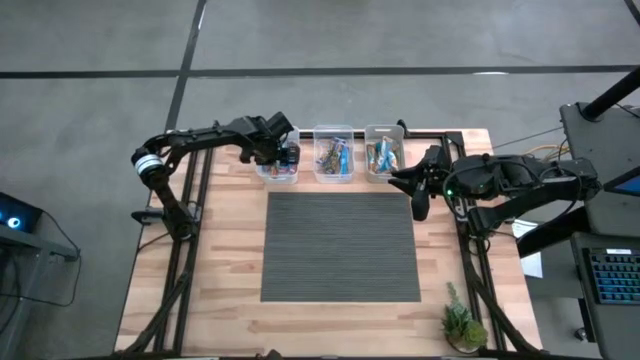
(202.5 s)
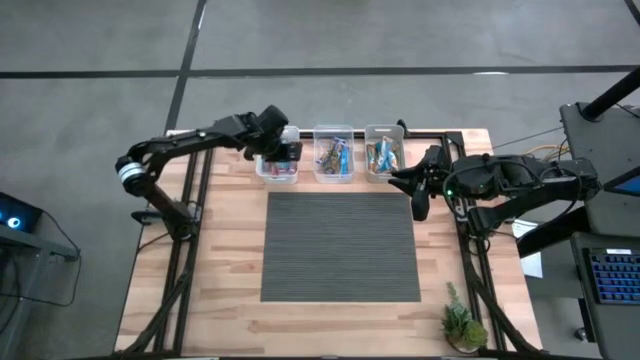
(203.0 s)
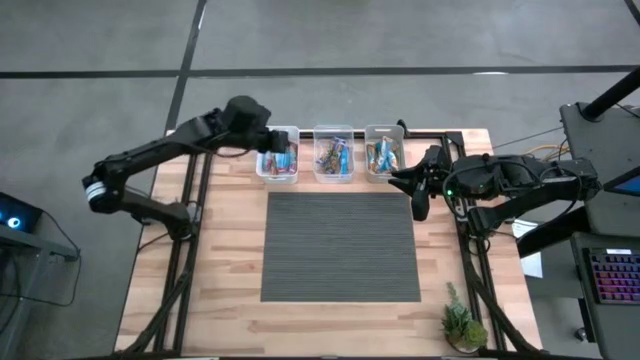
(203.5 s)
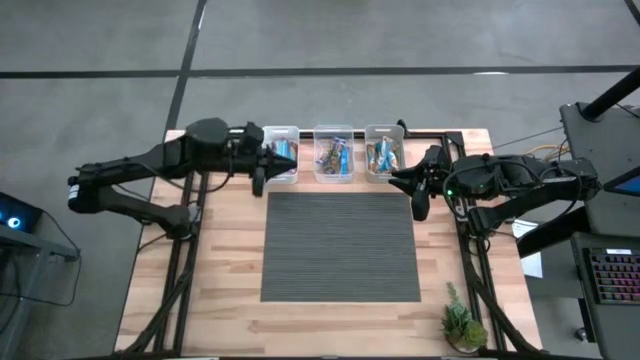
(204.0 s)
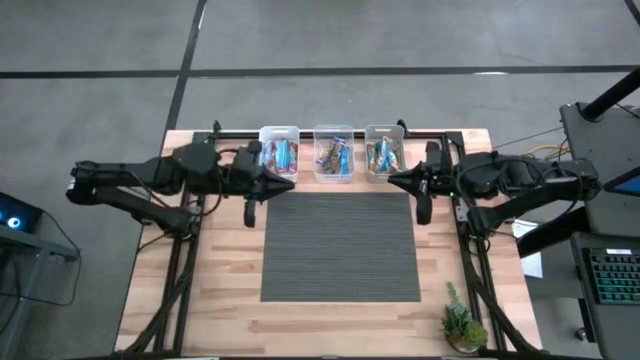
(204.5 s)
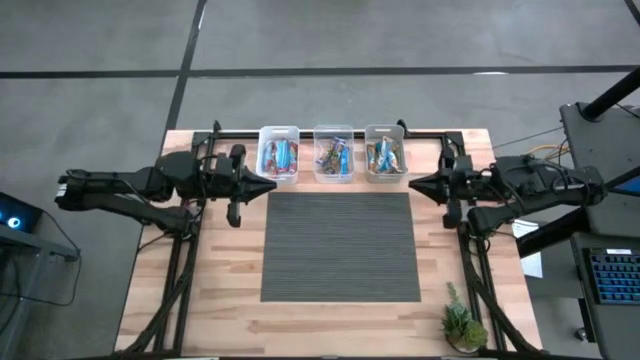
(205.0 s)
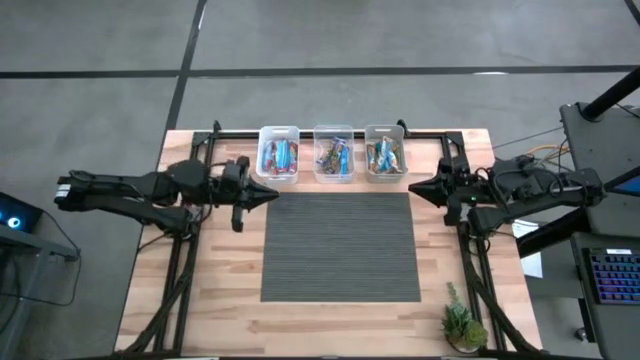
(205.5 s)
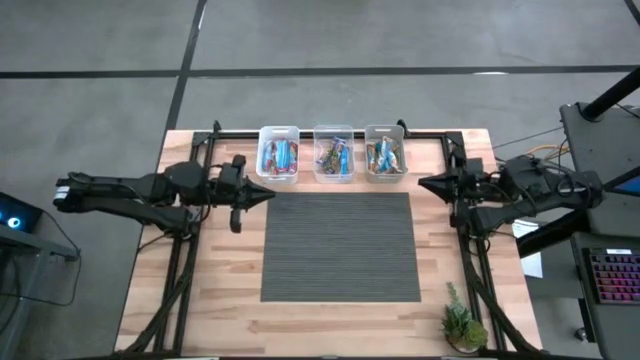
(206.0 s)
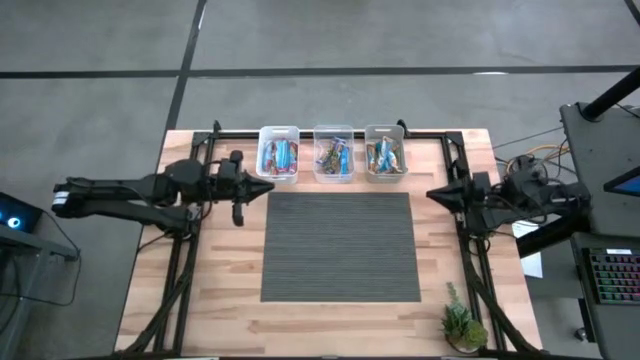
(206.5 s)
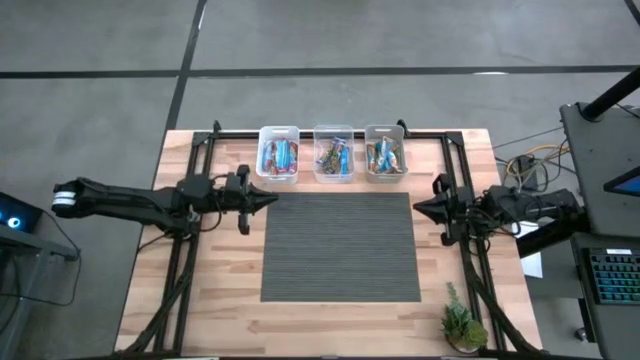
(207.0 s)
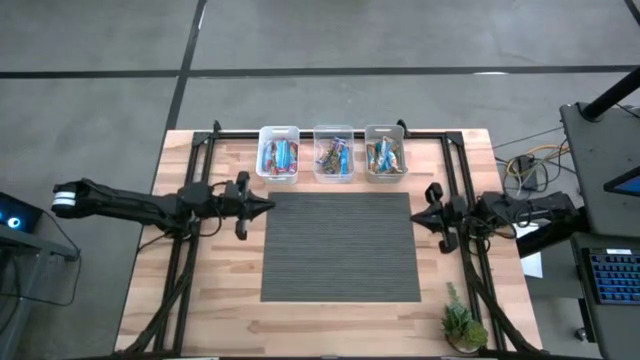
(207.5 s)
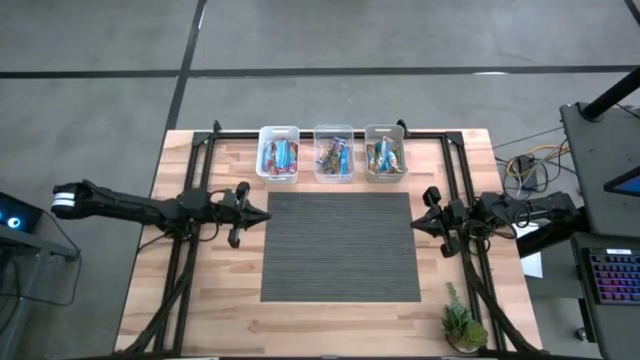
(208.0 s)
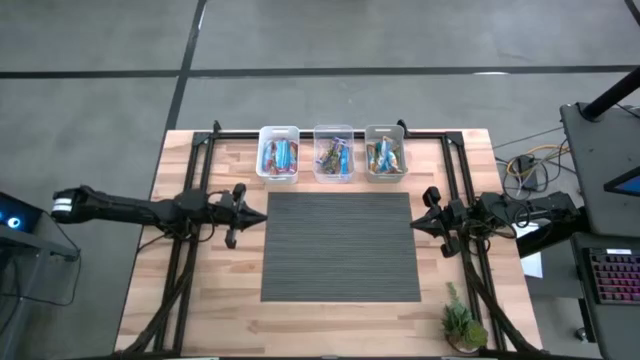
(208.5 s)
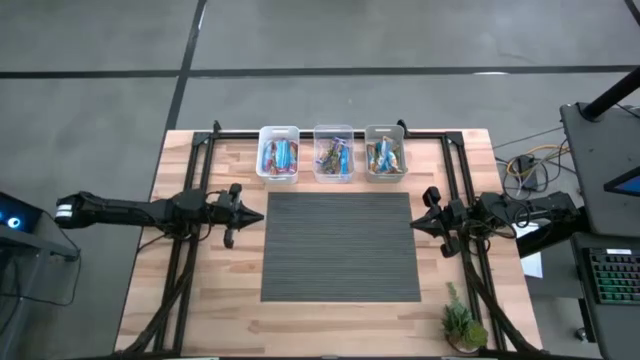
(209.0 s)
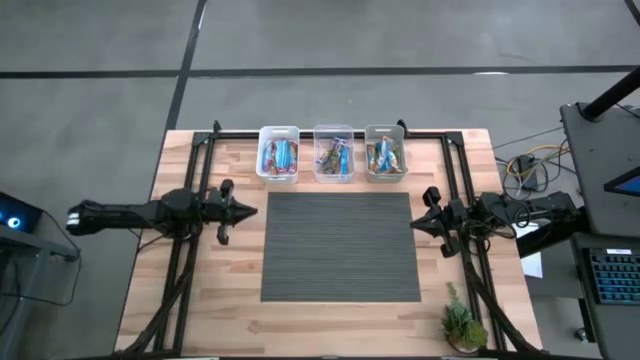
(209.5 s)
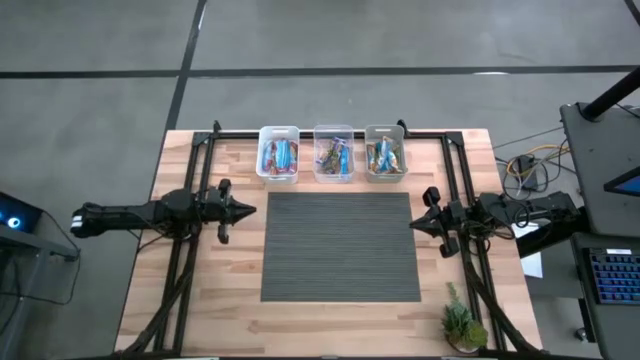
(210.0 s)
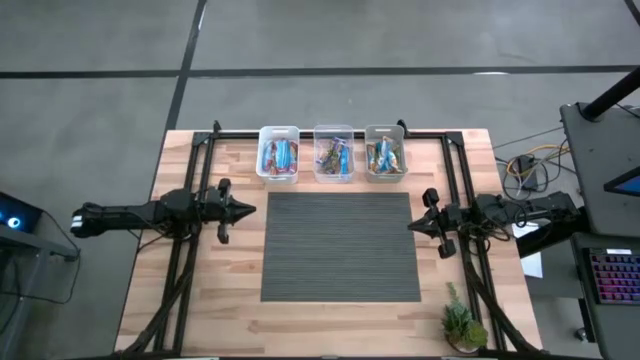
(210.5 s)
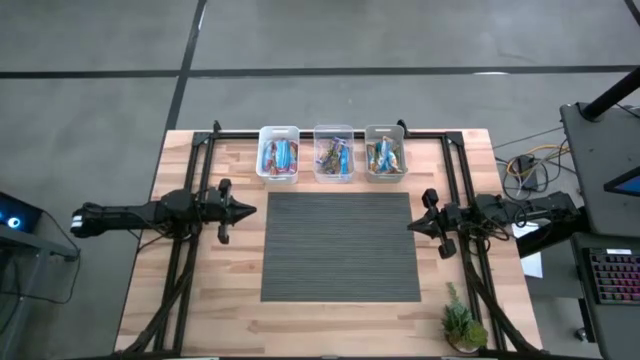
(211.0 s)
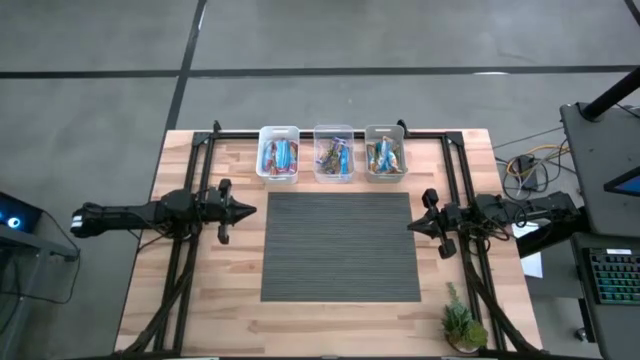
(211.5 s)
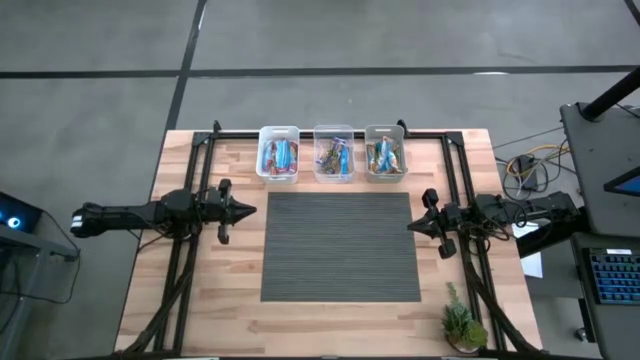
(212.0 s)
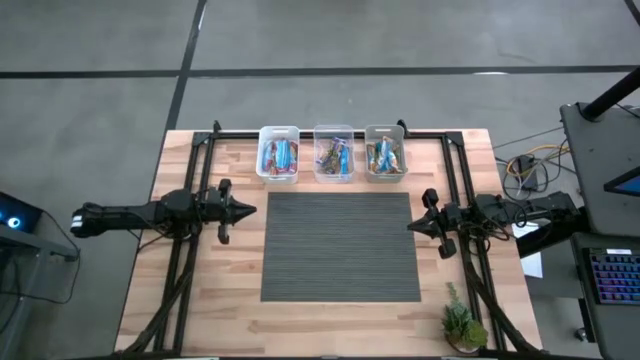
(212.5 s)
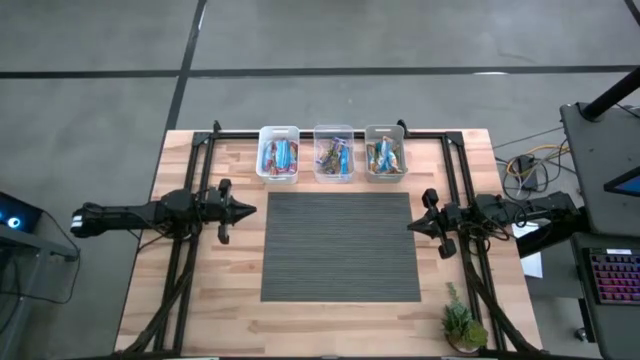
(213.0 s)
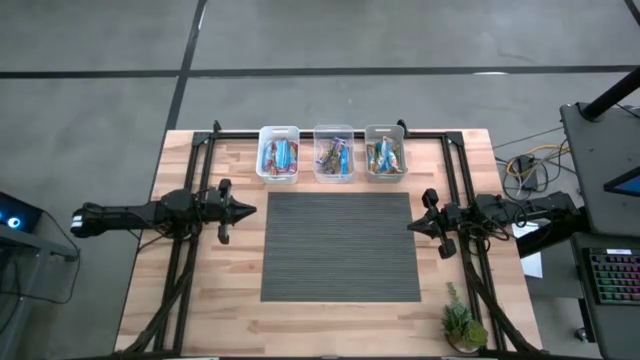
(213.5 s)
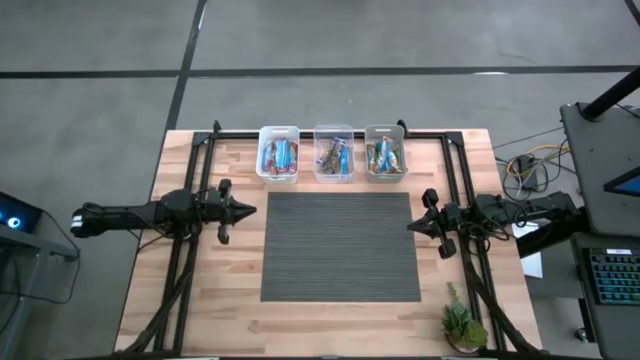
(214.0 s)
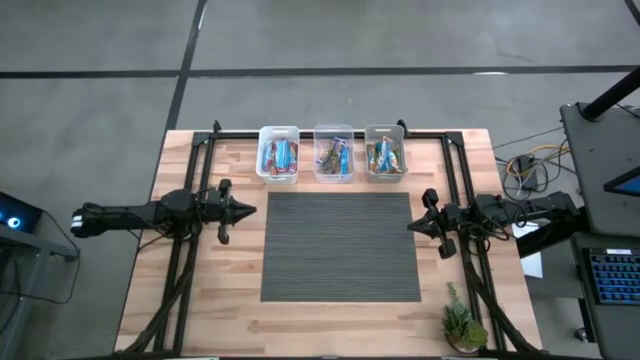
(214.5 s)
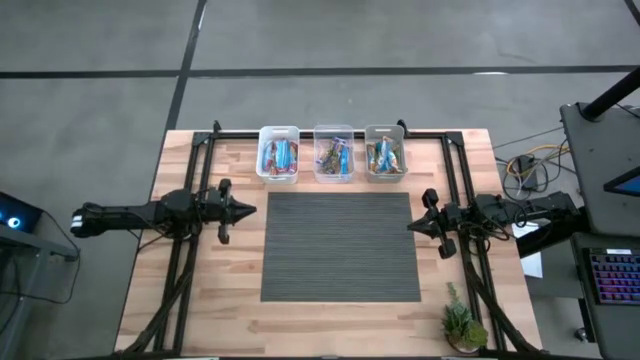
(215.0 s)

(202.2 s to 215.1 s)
Task: Pick and place Granola Bars by type
Return to Home Position

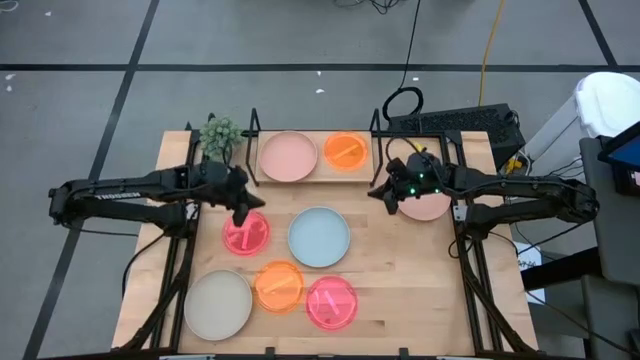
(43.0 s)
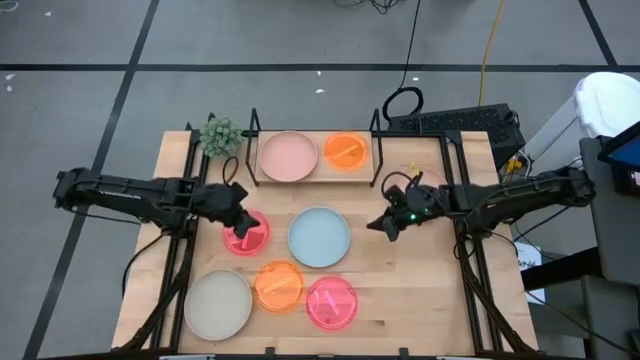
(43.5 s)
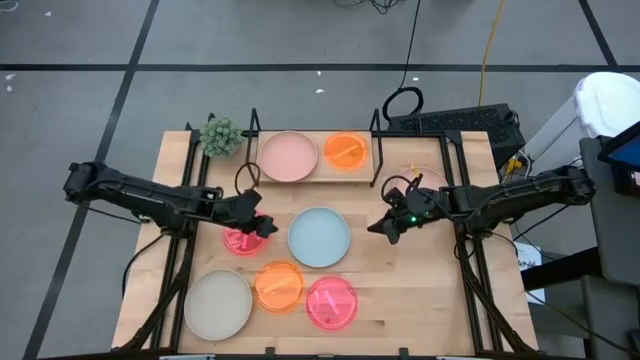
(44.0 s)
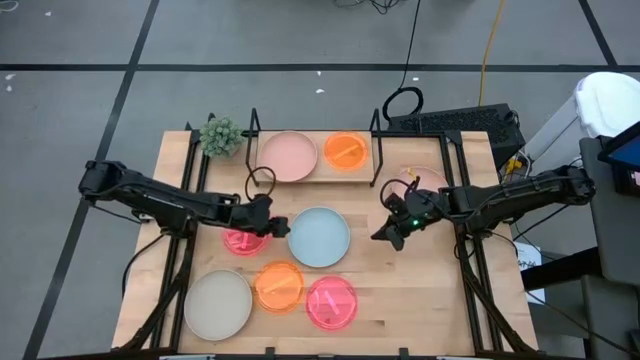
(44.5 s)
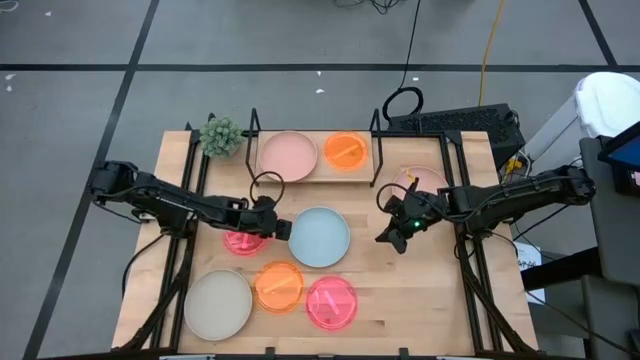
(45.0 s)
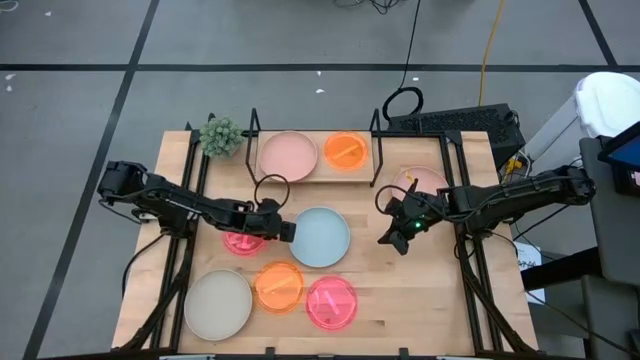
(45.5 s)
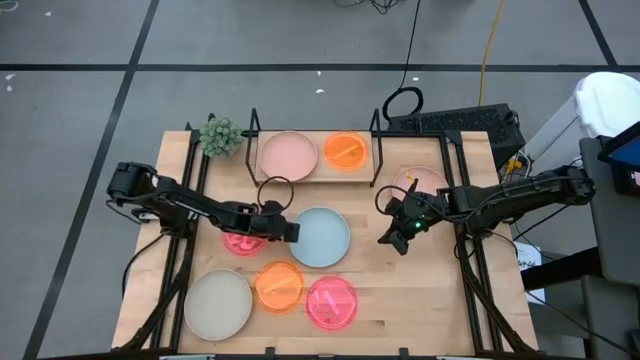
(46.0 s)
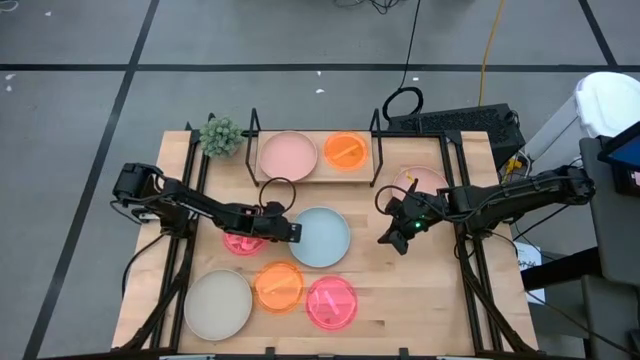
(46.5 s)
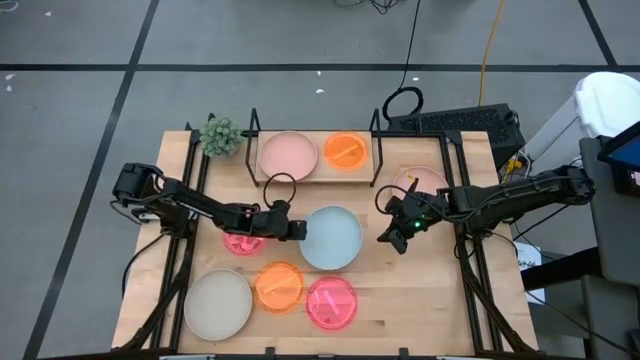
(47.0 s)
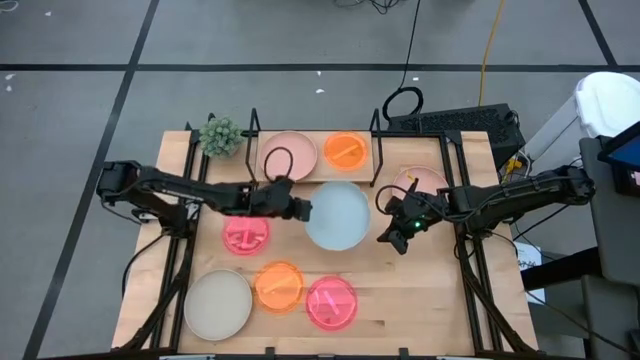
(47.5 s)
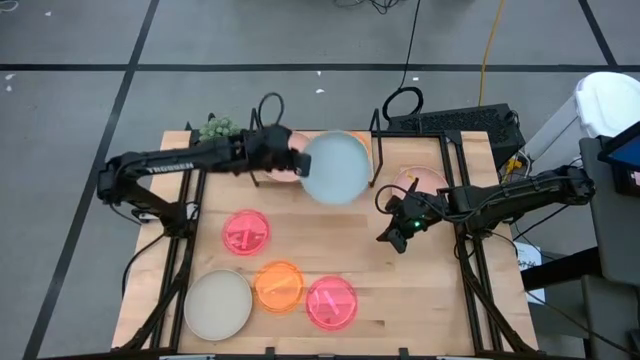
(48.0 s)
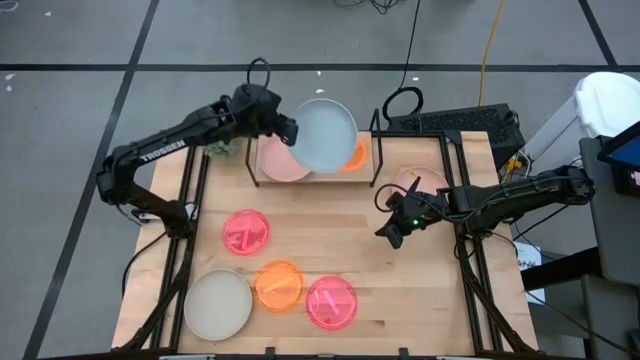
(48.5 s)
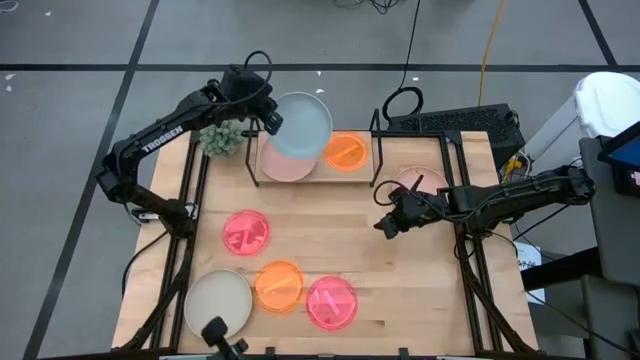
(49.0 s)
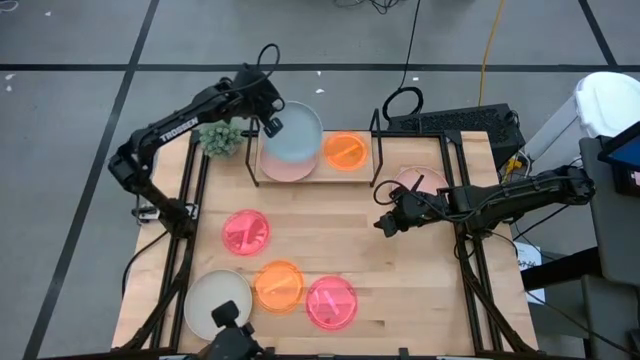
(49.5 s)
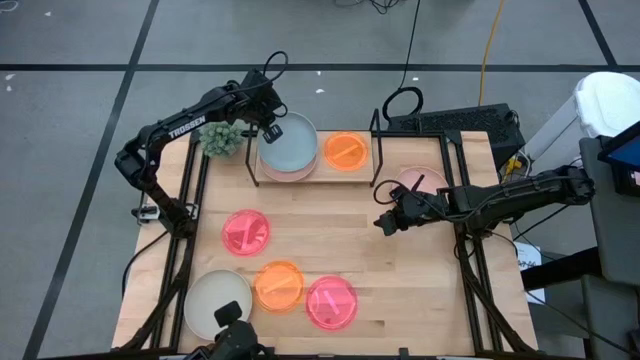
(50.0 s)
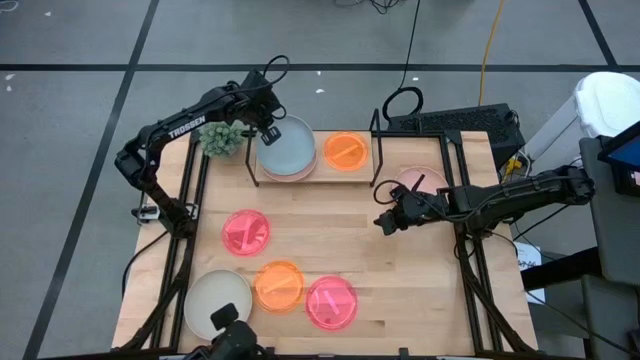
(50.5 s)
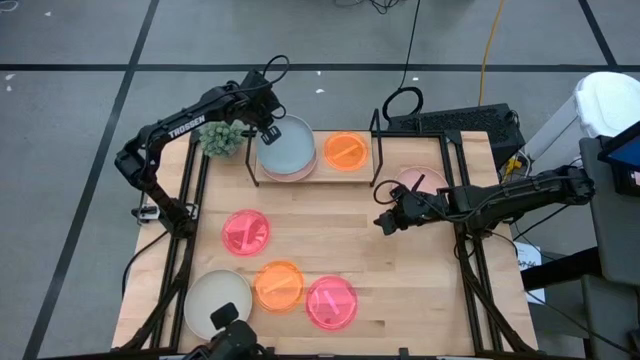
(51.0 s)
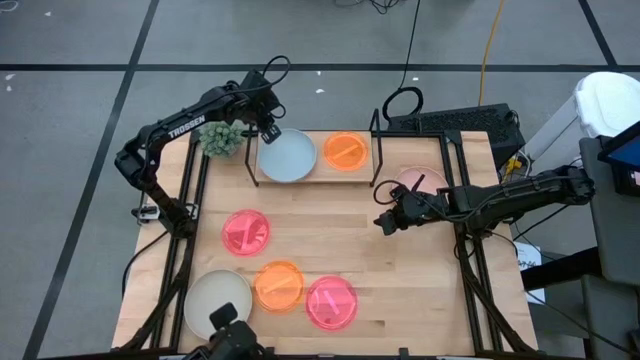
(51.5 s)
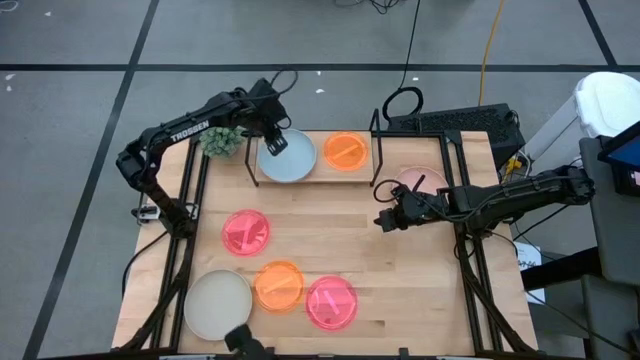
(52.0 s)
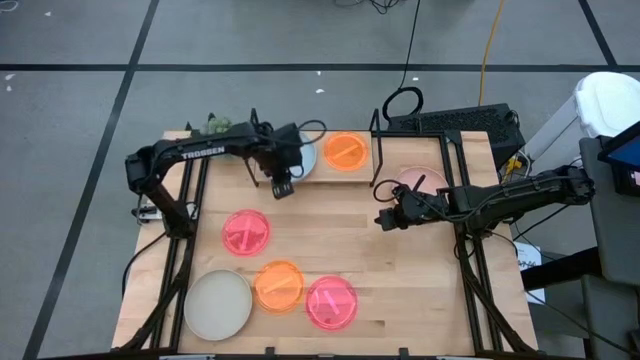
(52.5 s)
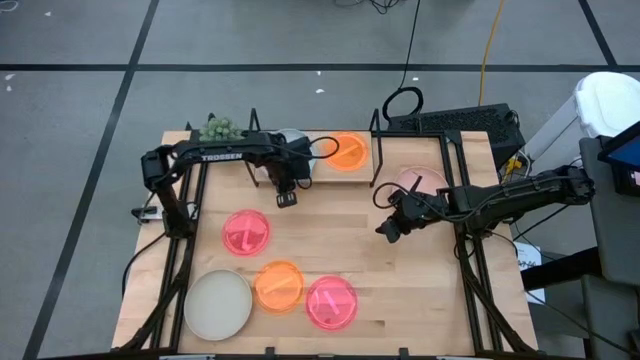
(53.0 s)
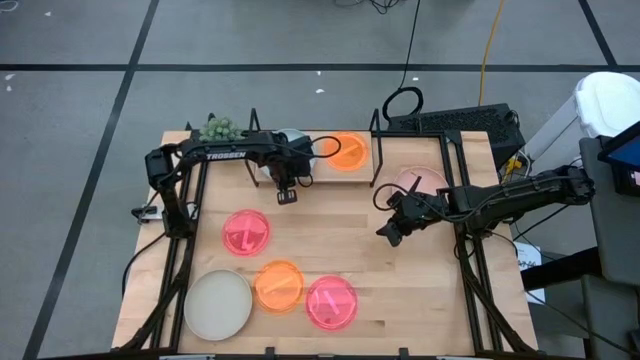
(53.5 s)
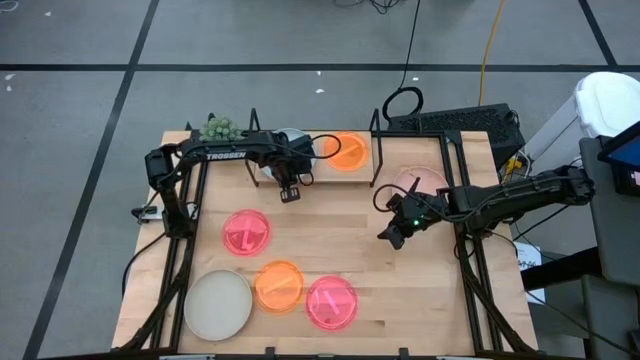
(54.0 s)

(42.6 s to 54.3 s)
Task: Place and stack plates onto a shelf
Stack the light blue plate on the pink plate on the shelf
